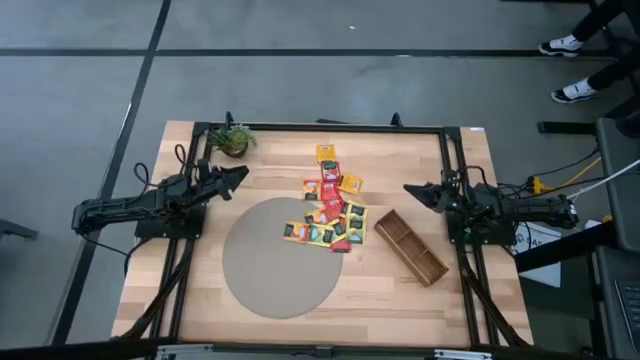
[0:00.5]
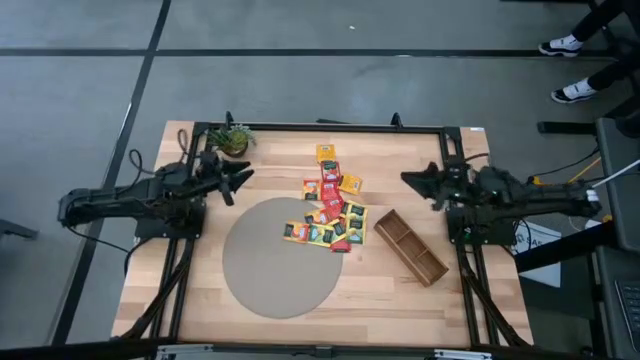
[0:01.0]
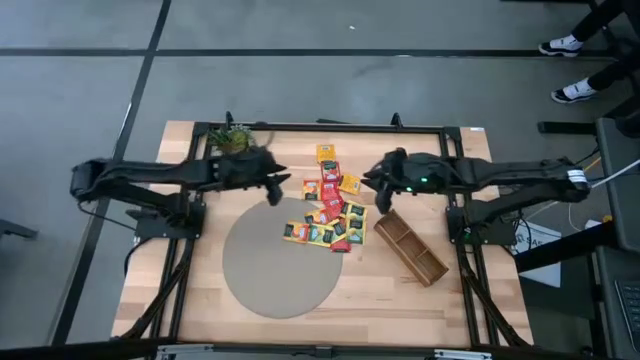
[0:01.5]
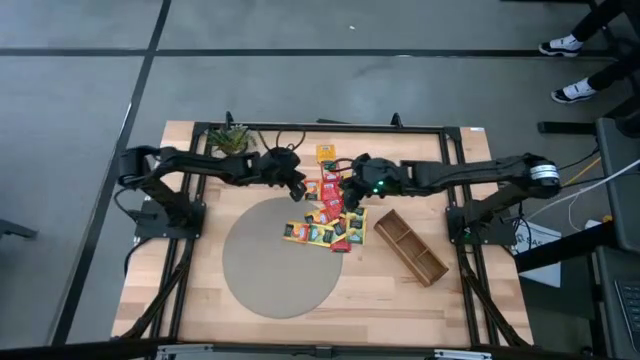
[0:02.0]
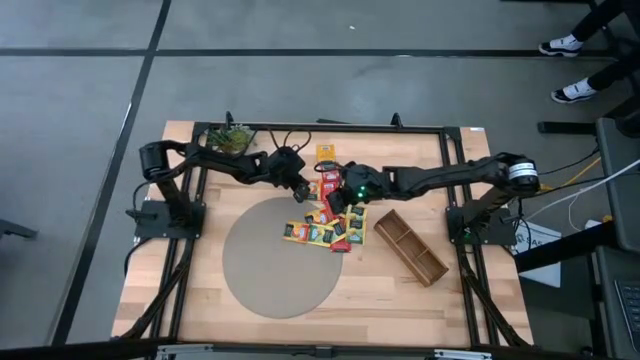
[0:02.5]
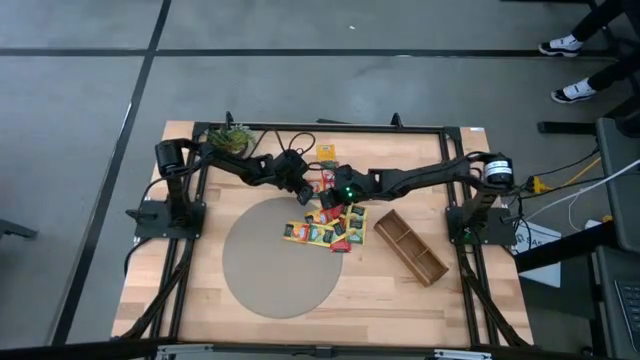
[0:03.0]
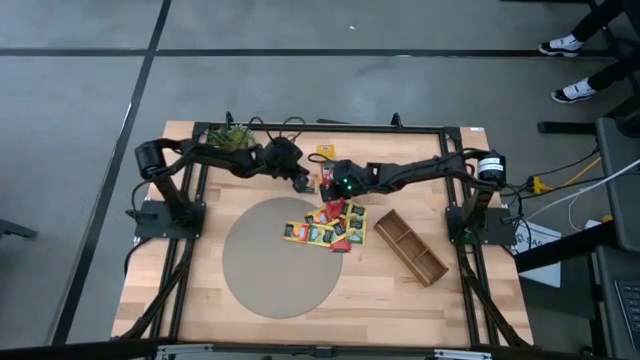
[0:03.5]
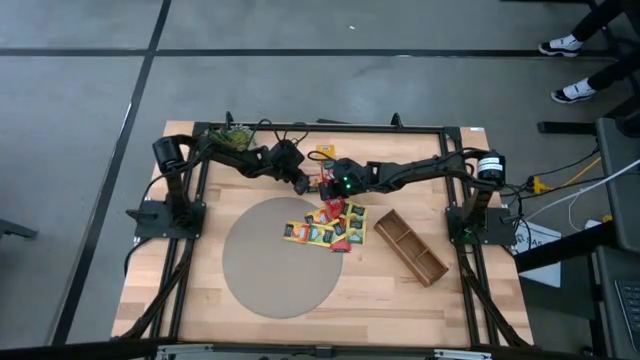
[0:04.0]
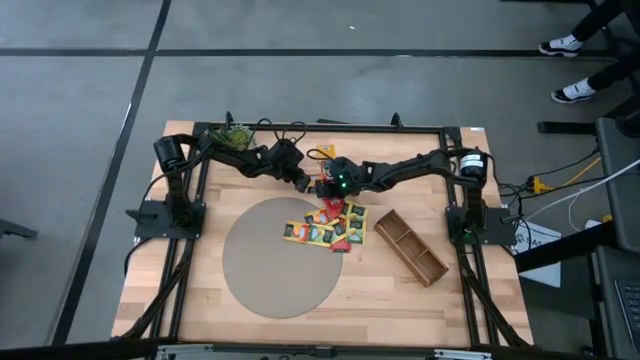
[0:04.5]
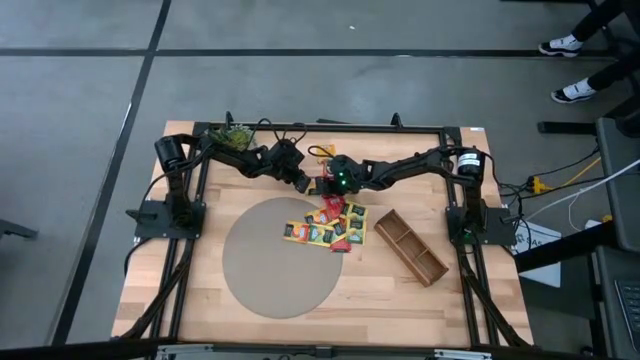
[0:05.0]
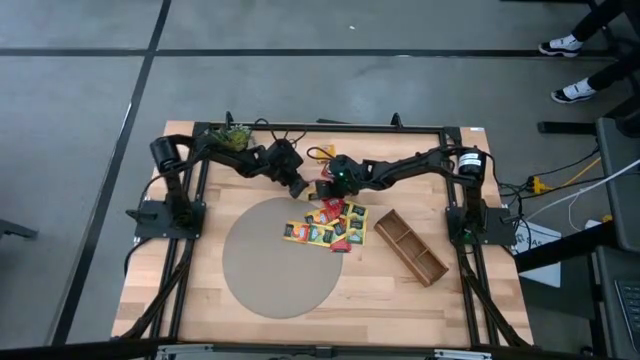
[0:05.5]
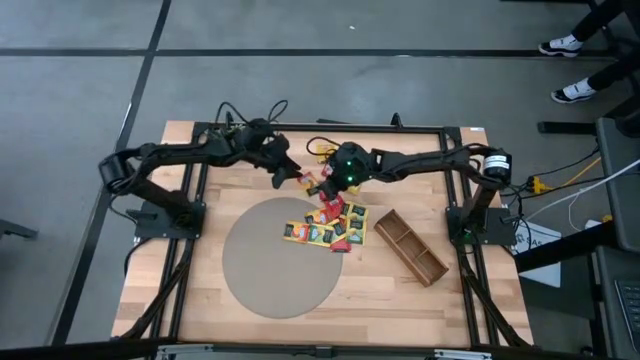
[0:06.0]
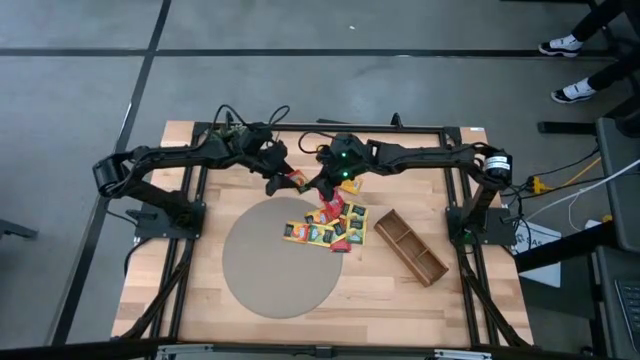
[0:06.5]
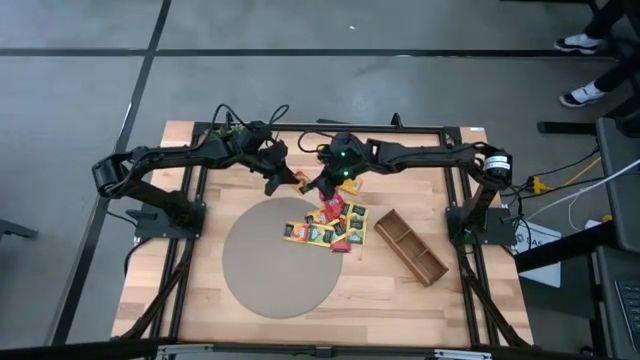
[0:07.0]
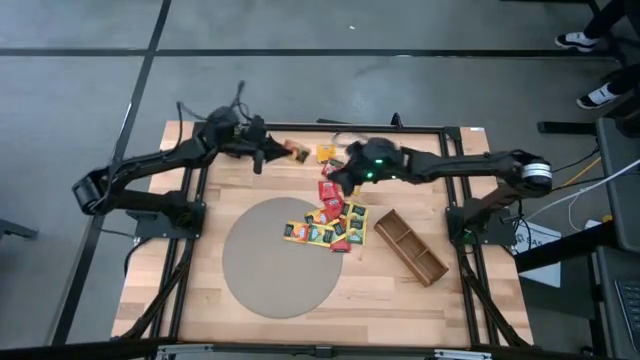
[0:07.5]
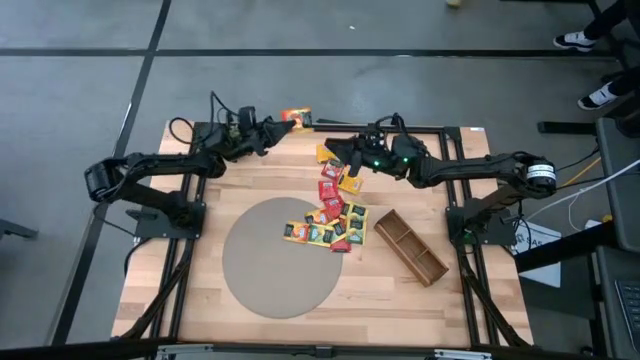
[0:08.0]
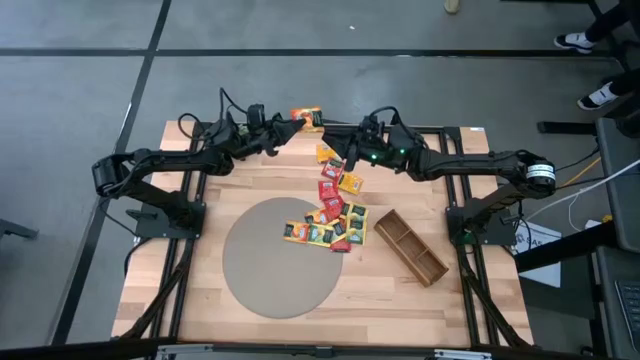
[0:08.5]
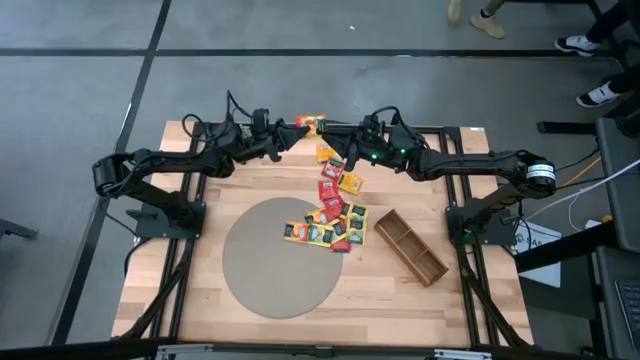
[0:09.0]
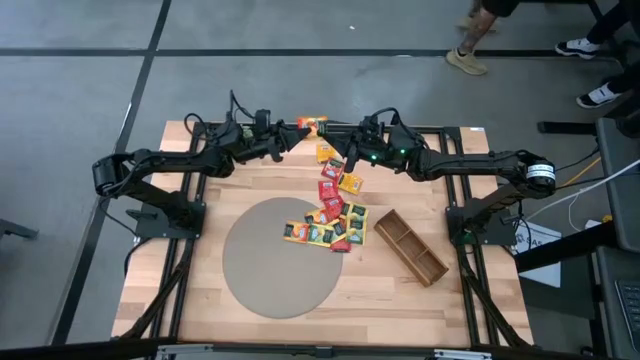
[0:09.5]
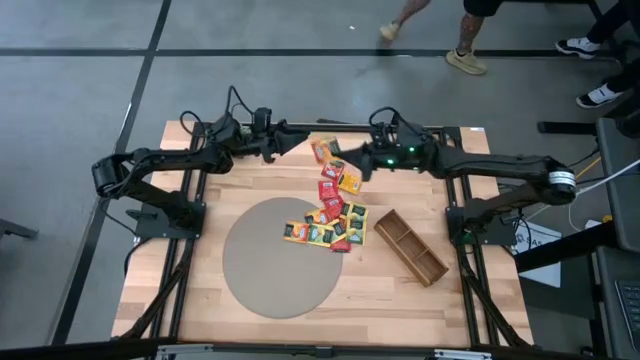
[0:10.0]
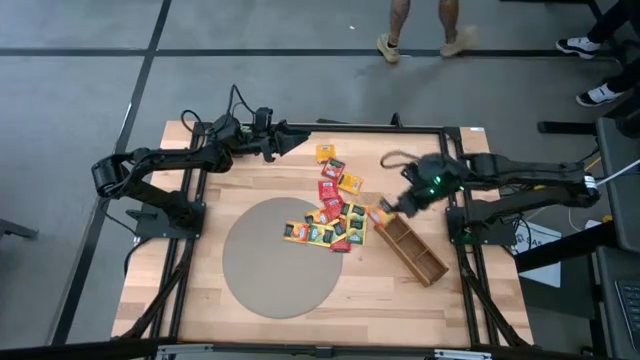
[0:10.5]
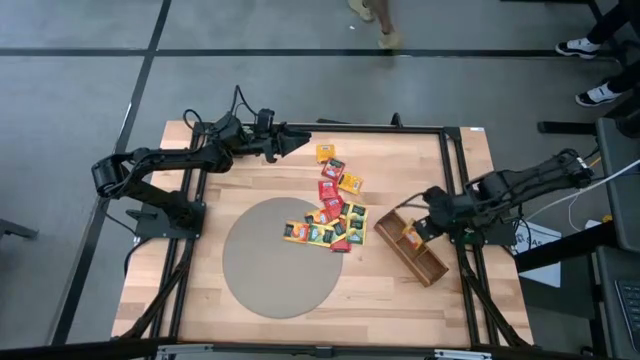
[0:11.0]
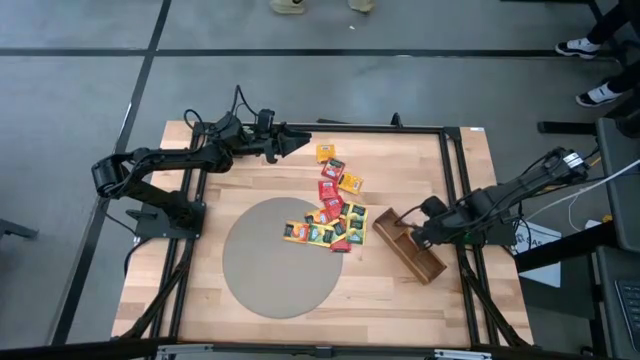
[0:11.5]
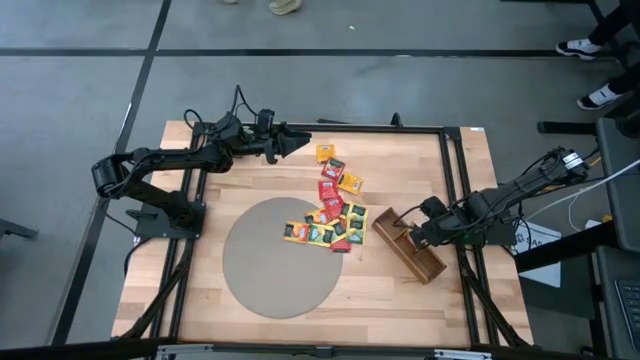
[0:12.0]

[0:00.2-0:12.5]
Task: Pick & Place Tea
Put the orange tea bag into the middle section of the wooden organizer

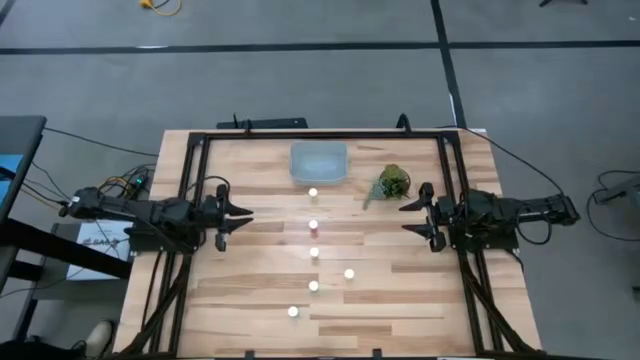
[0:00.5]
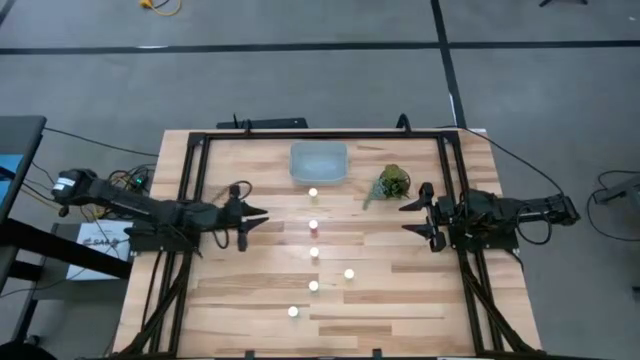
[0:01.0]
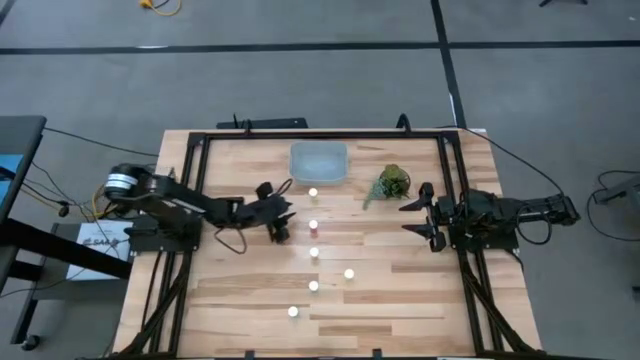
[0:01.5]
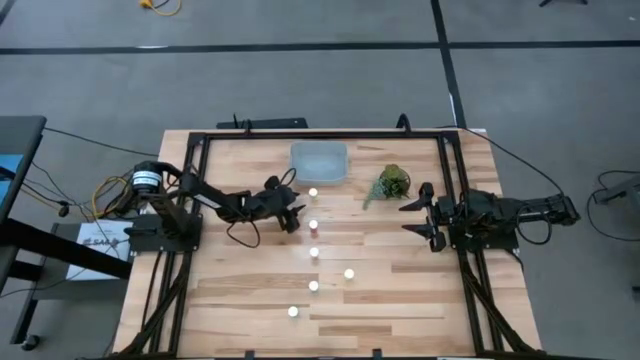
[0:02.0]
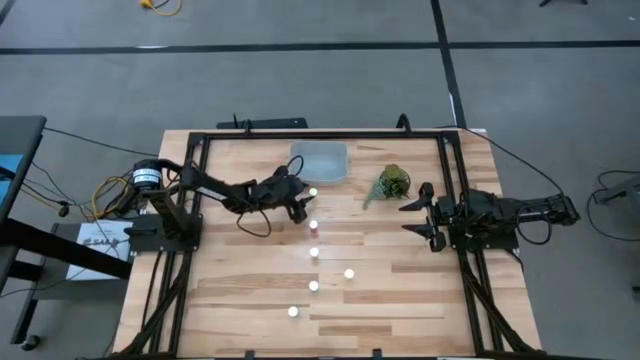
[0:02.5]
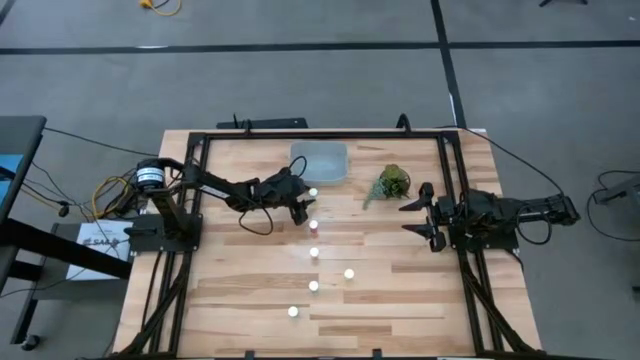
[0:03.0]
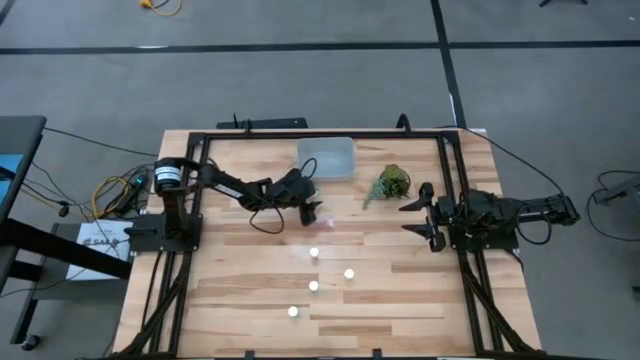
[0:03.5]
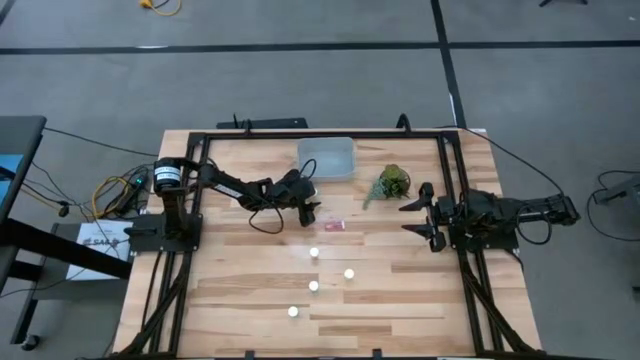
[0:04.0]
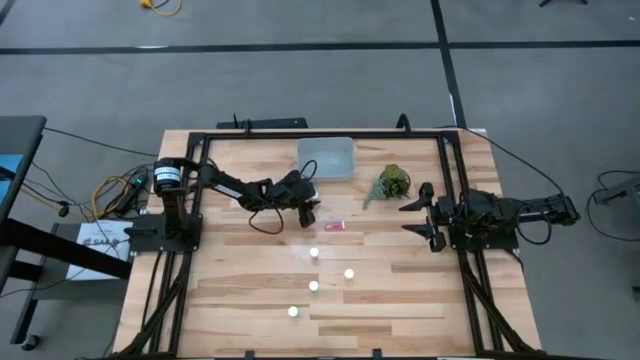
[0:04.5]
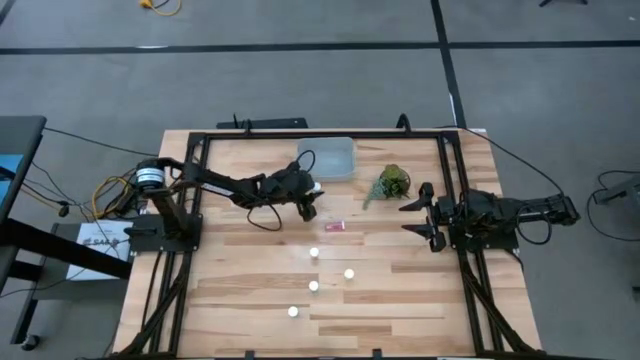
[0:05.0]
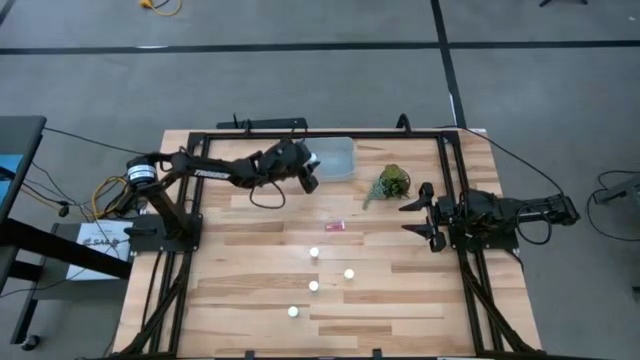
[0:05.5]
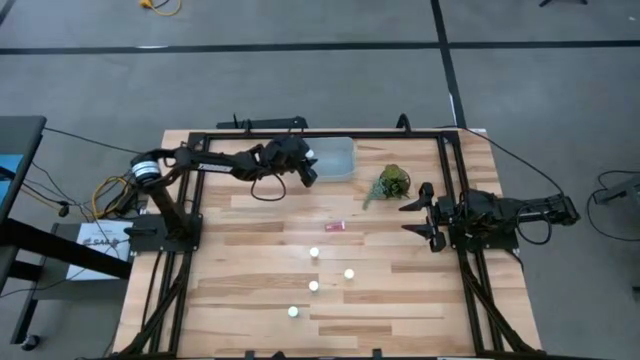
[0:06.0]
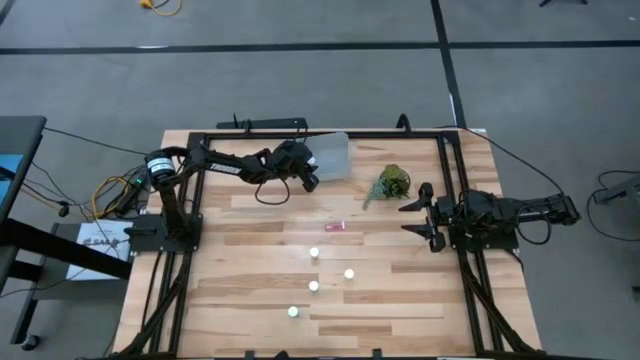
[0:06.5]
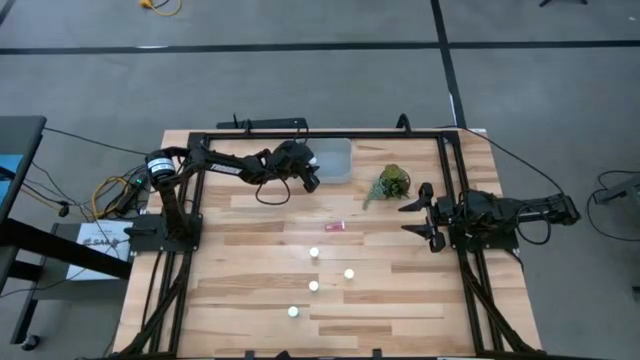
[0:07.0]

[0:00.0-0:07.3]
Task: Pick and place pill bottles into a basket
Put the top yellow pill bottle into the gray bin
